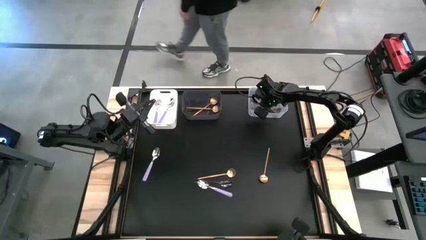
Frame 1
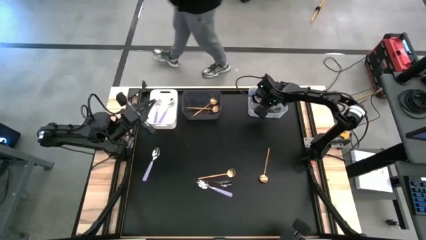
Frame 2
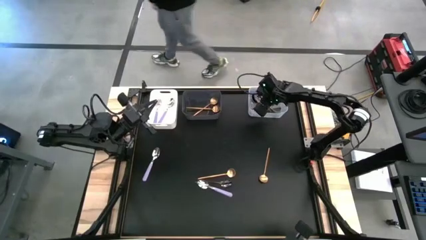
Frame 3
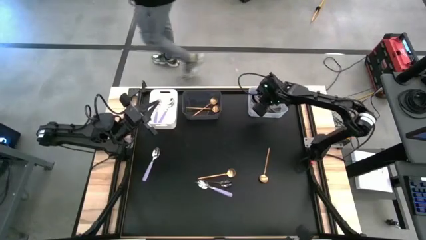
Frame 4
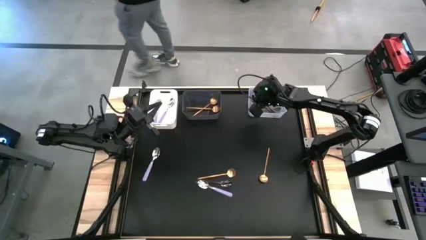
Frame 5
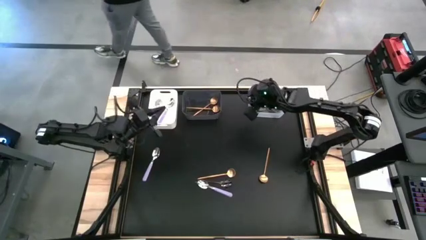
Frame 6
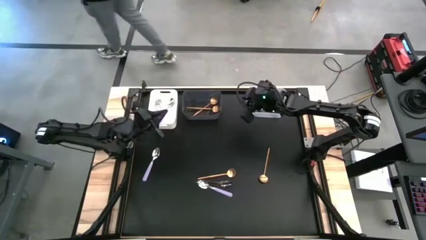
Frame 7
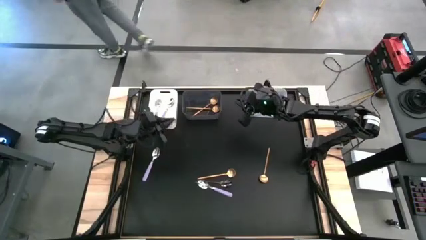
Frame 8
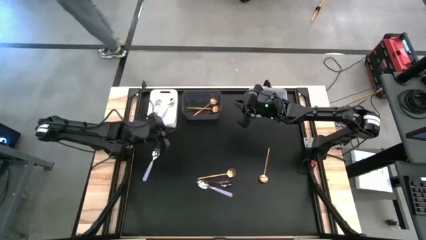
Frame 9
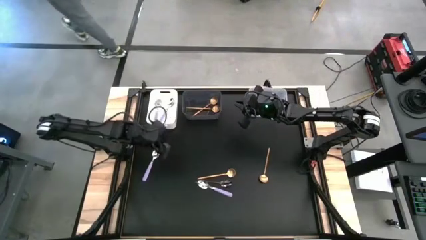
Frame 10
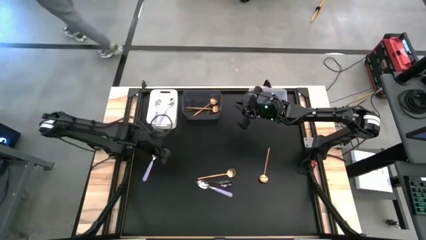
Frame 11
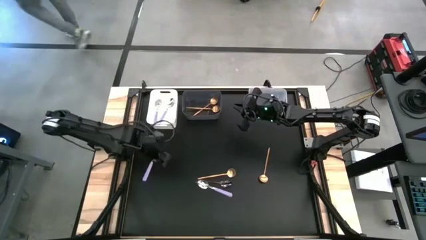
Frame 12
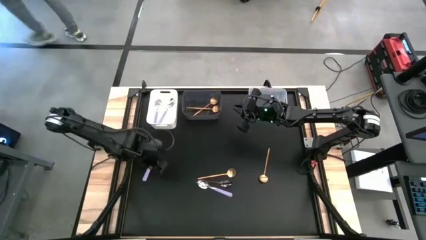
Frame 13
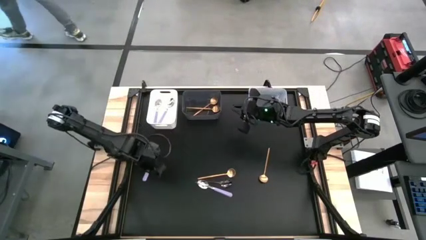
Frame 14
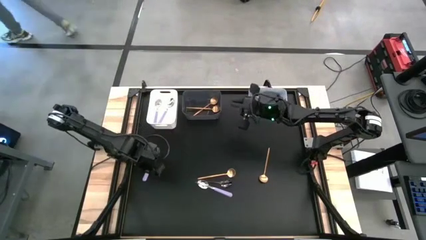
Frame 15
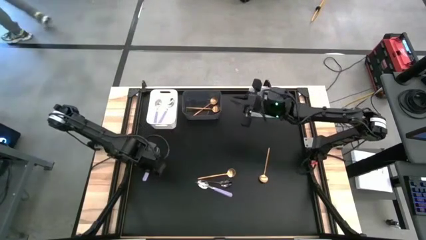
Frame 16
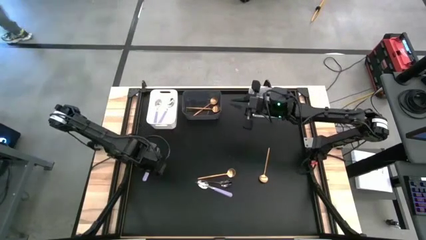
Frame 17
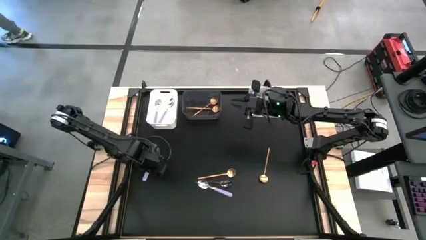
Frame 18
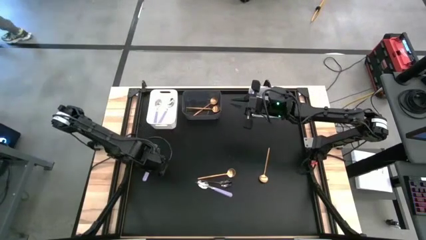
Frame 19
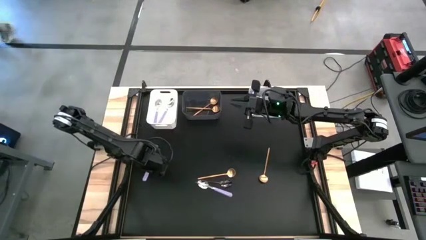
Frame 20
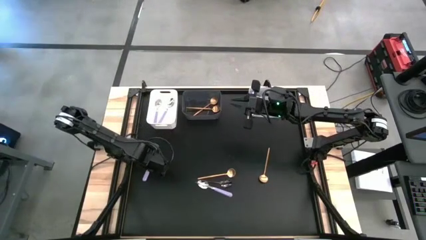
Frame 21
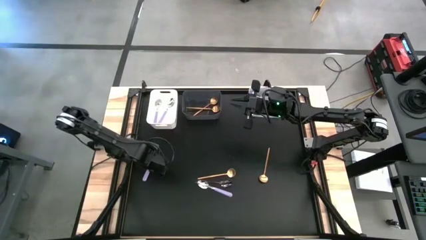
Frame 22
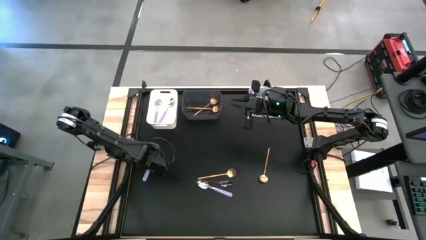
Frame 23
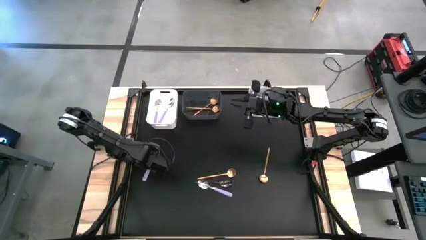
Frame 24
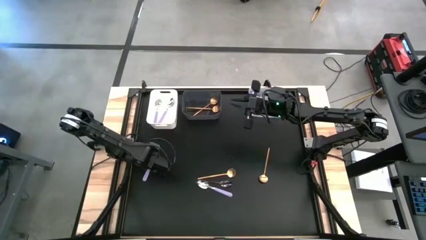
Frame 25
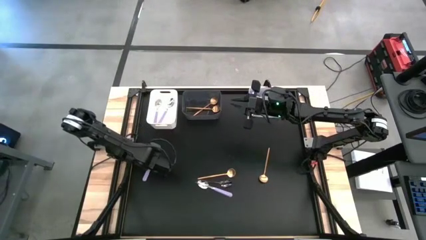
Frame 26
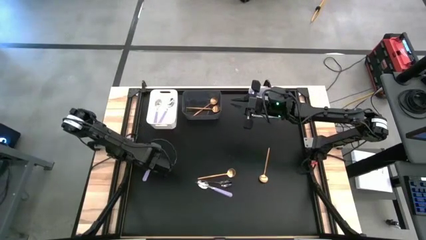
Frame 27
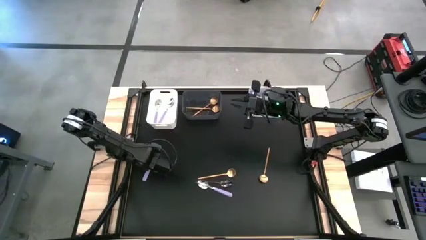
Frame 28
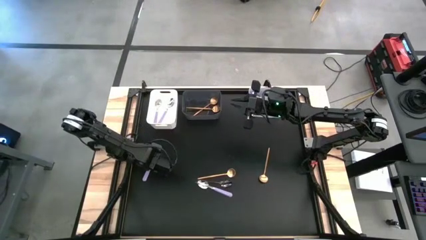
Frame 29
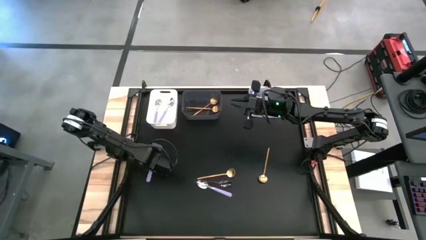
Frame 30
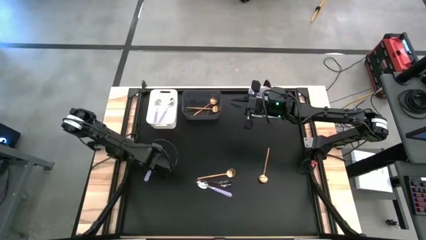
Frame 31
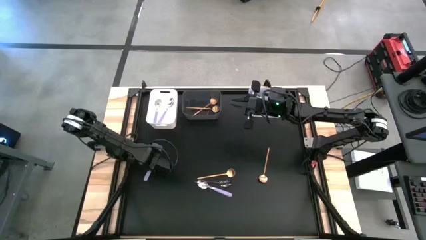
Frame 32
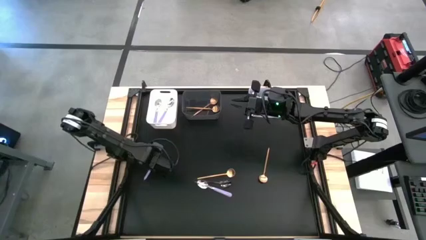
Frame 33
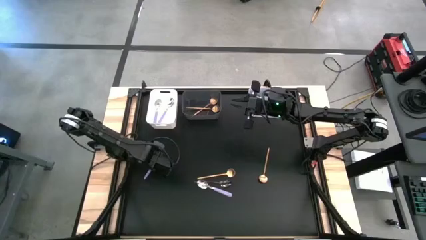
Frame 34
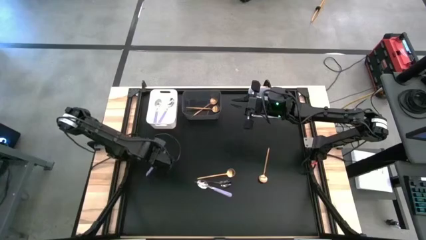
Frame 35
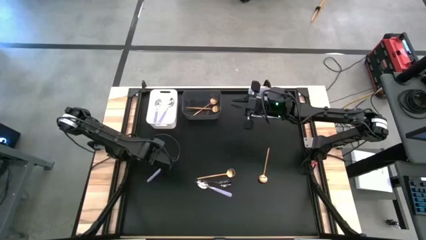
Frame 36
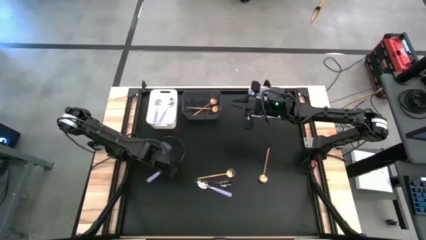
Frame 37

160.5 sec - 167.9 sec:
Task: Sort silverware by color (type)
Put the purple spoon into the white bin

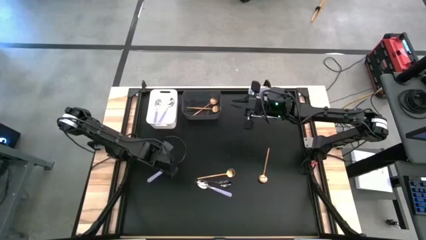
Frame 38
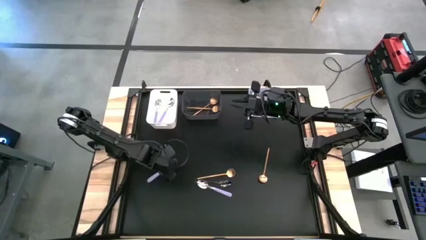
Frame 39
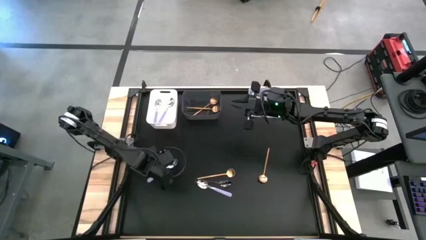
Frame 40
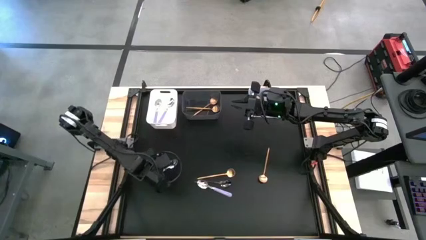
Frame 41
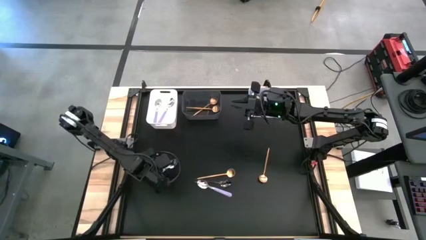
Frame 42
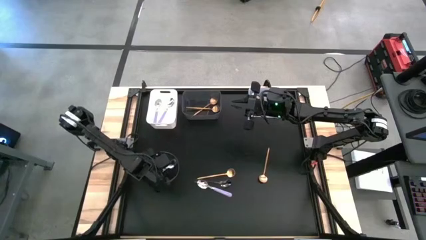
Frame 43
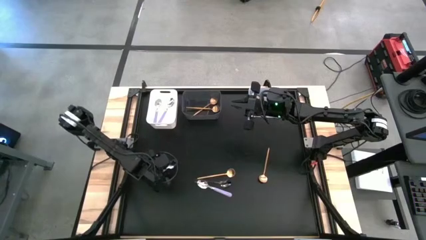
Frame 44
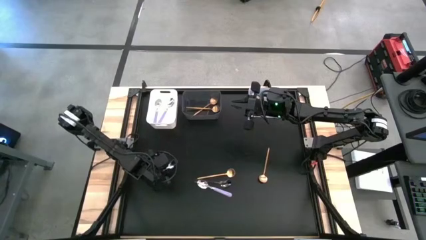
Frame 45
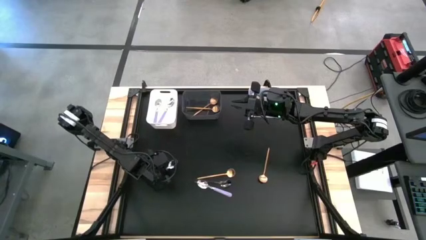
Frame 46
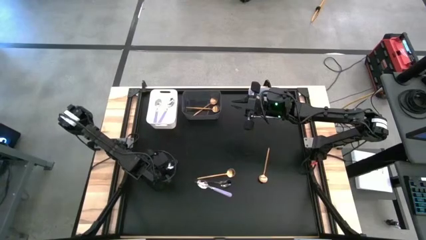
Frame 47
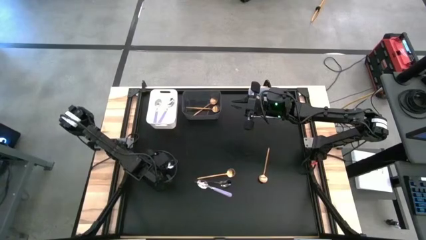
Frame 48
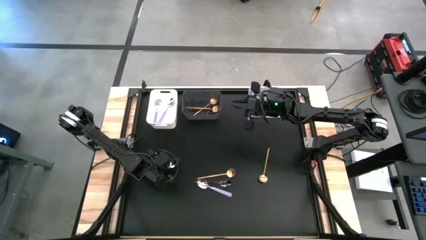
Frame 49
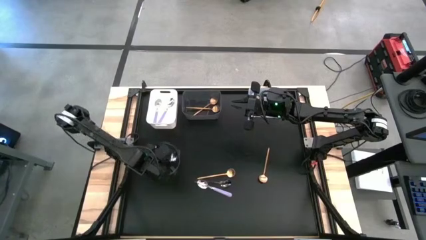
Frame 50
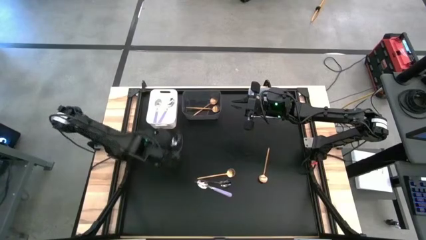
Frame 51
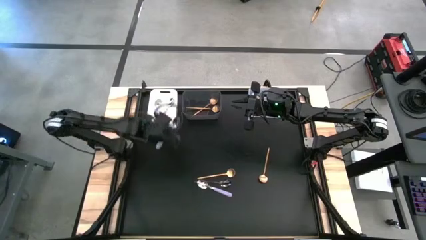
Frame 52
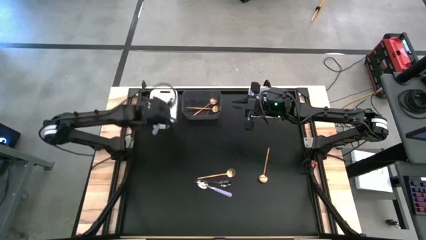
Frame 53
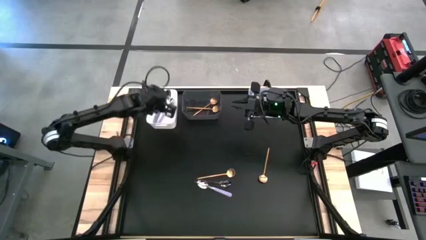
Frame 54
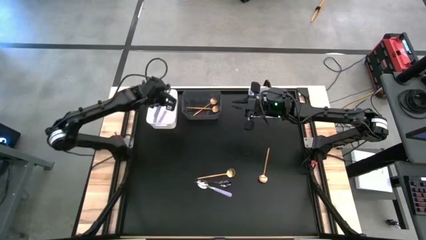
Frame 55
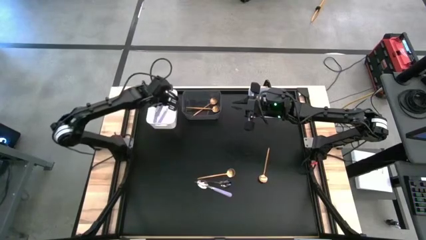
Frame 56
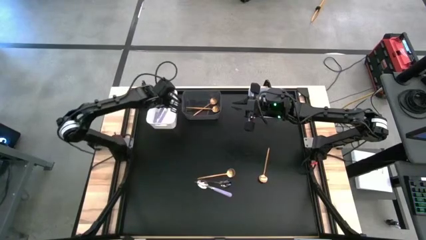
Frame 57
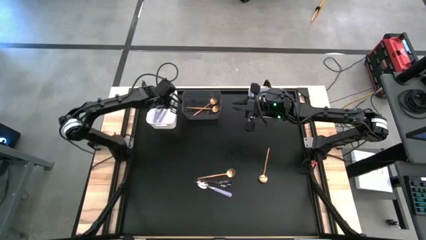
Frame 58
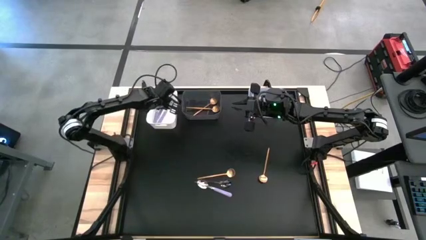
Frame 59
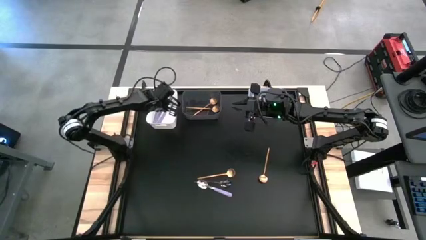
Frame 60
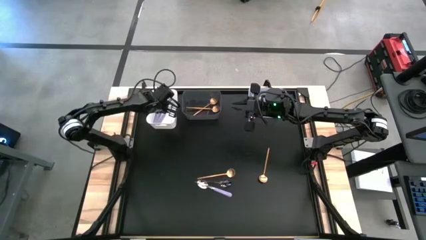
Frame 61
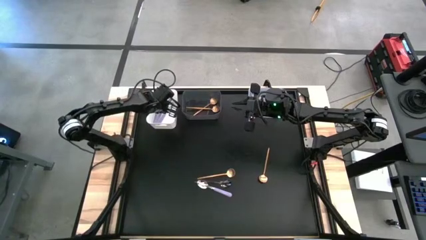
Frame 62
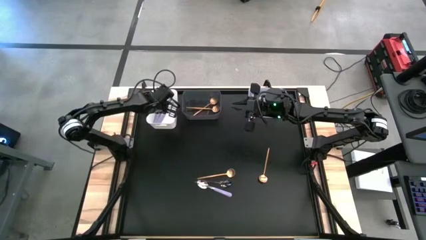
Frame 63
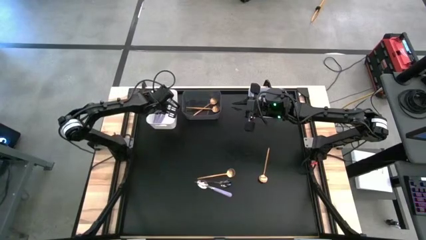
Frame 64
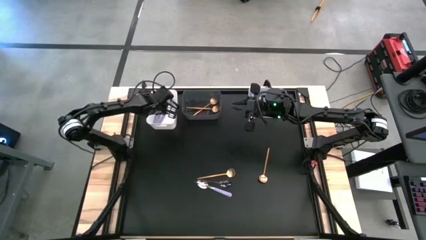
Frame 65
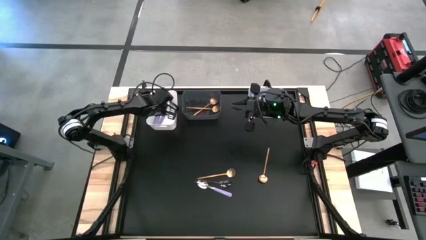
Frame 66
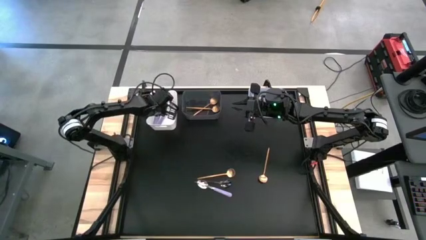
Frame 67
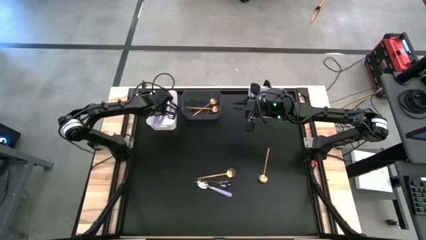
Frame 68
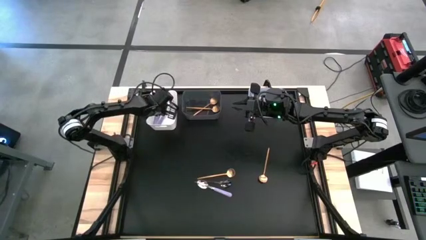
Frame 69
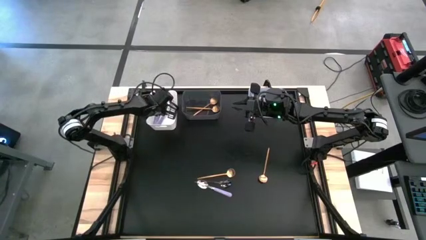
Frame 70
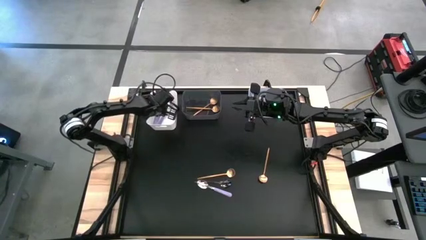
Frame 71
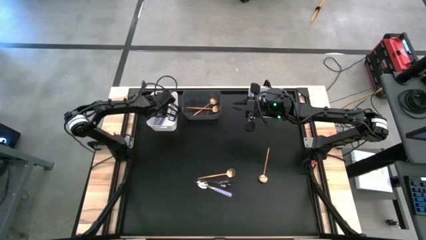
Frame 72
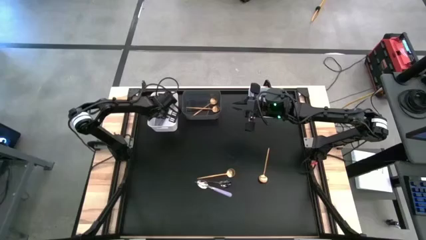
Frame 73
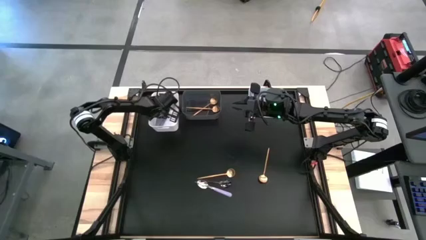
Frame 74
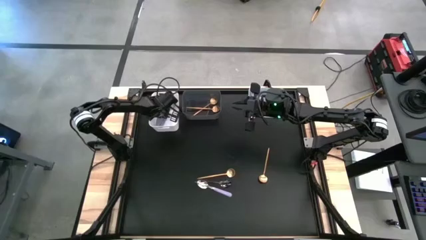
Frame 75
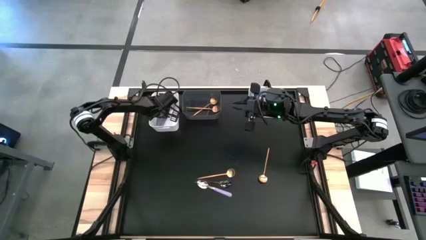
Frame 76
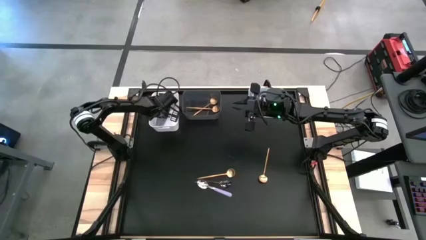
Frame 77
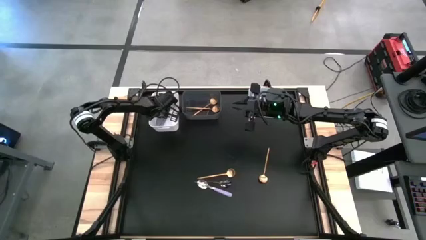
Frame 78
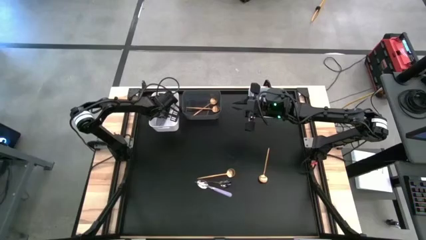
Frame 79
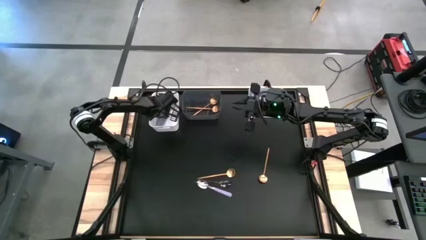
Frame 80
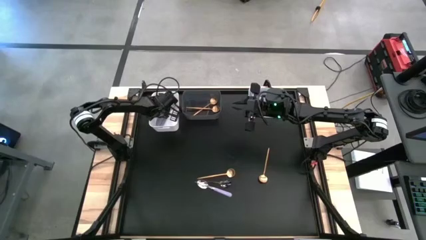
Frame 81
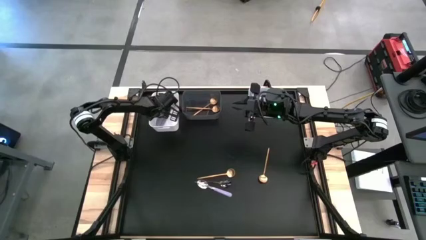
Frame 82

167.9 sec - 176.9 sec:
Put the purple spoon into the white bin
